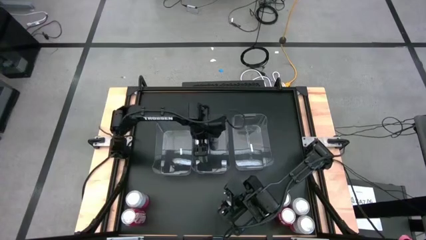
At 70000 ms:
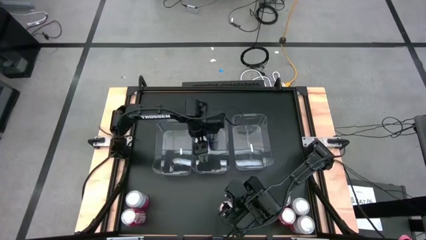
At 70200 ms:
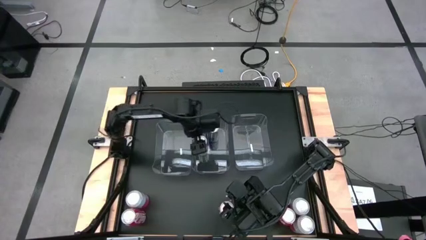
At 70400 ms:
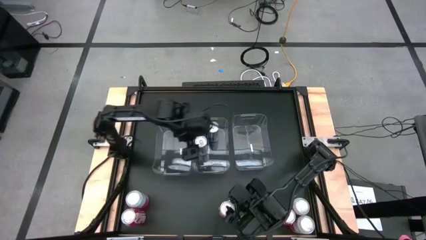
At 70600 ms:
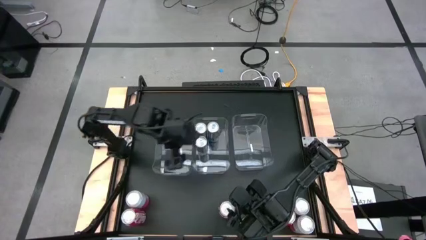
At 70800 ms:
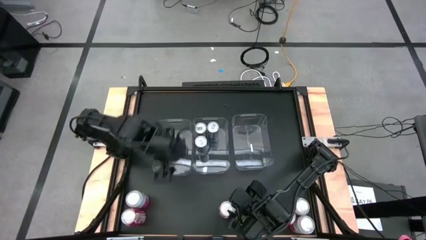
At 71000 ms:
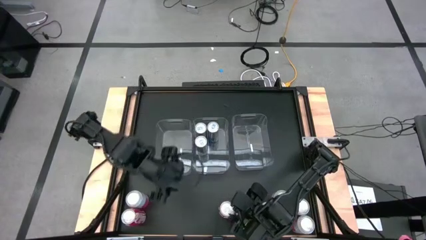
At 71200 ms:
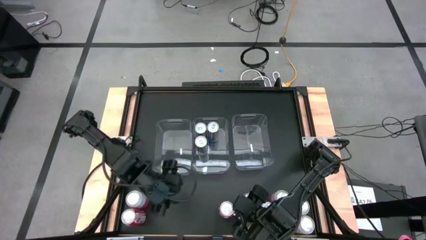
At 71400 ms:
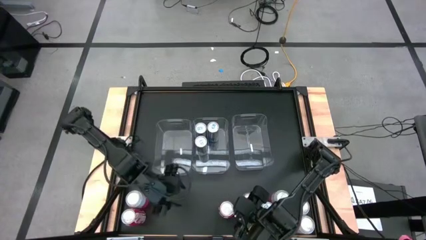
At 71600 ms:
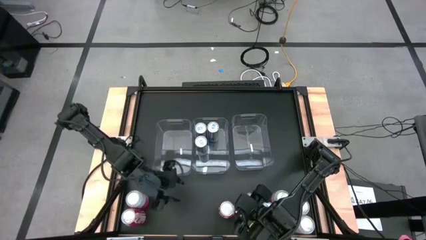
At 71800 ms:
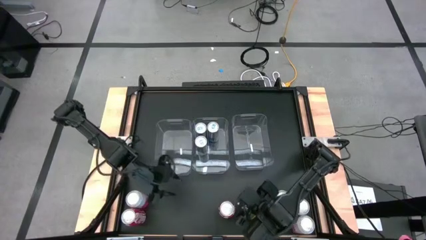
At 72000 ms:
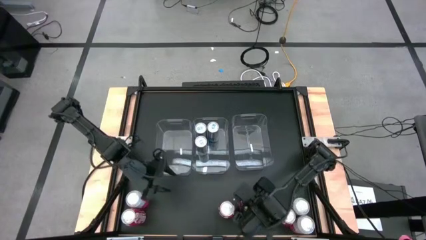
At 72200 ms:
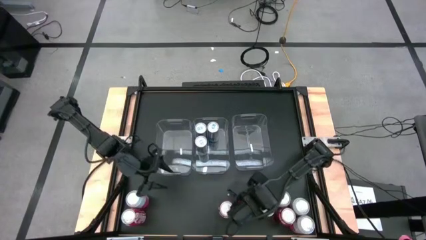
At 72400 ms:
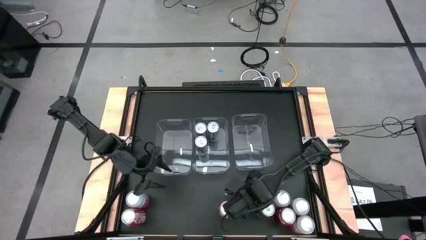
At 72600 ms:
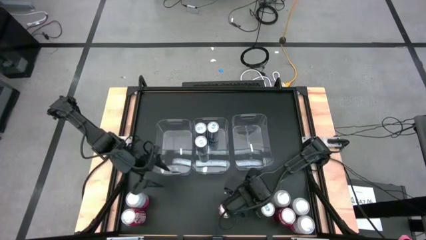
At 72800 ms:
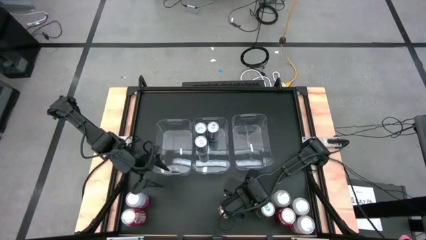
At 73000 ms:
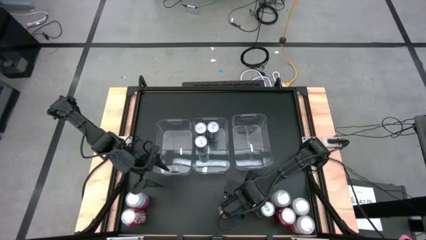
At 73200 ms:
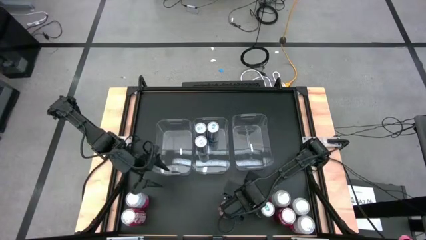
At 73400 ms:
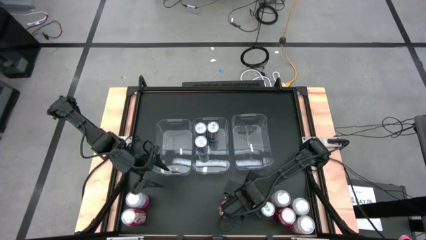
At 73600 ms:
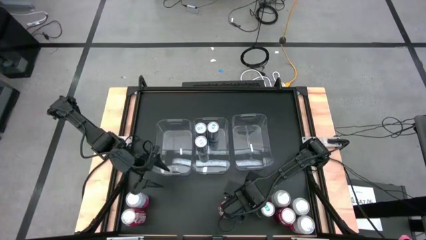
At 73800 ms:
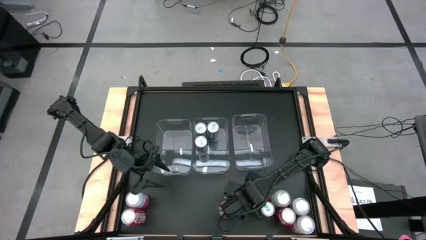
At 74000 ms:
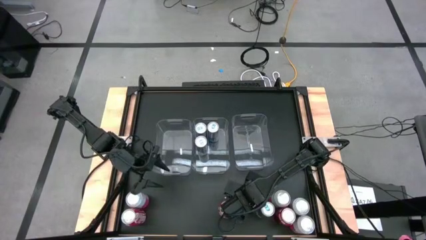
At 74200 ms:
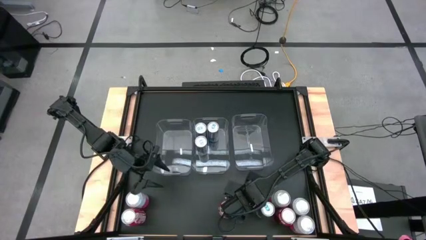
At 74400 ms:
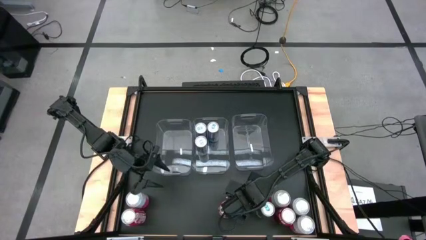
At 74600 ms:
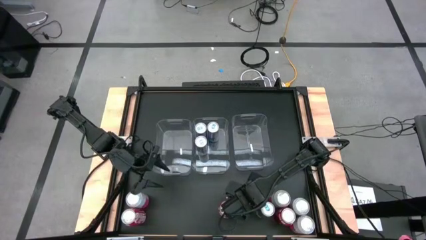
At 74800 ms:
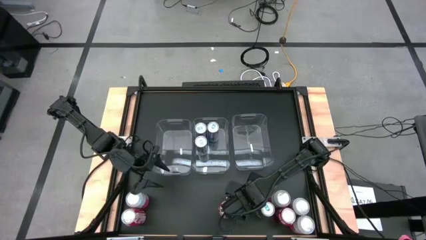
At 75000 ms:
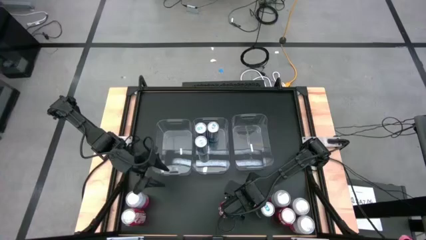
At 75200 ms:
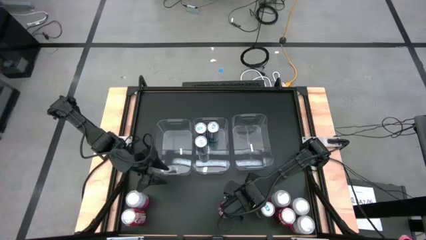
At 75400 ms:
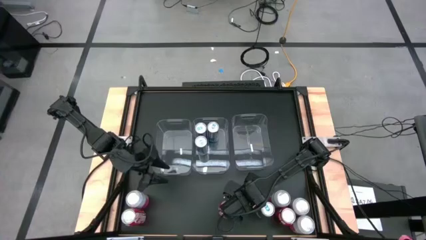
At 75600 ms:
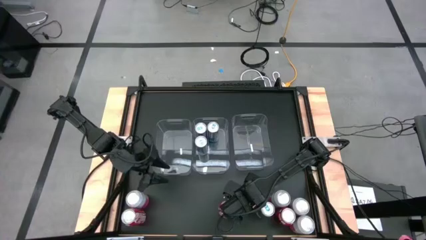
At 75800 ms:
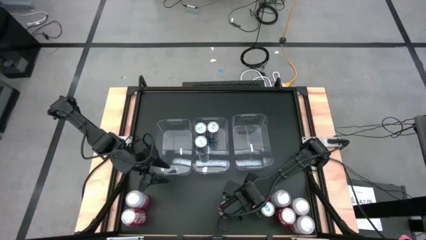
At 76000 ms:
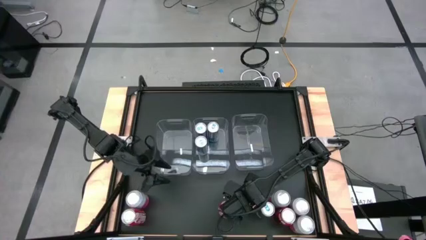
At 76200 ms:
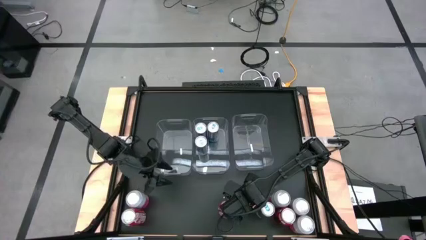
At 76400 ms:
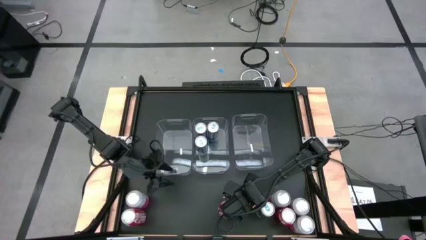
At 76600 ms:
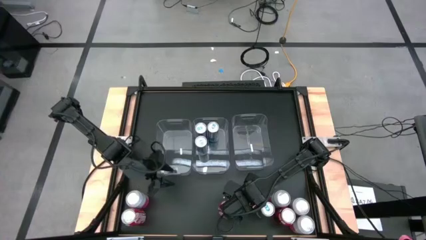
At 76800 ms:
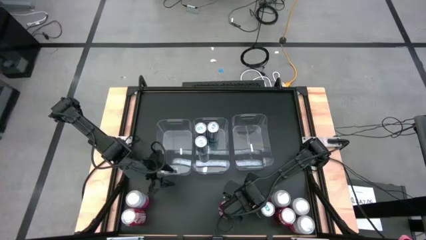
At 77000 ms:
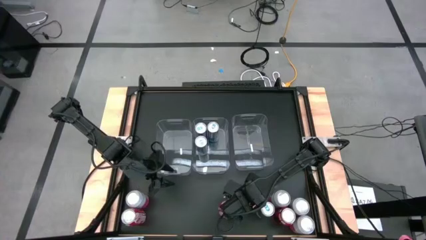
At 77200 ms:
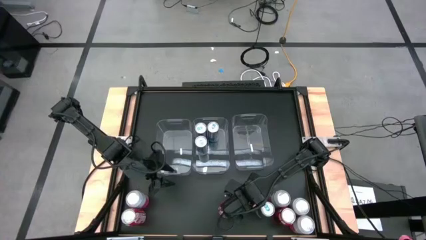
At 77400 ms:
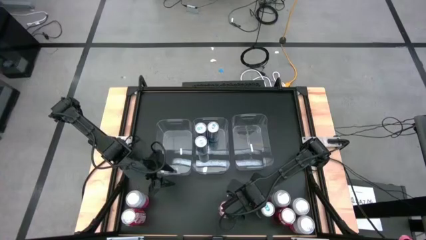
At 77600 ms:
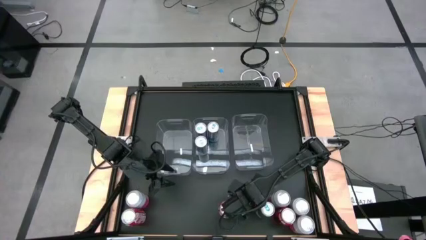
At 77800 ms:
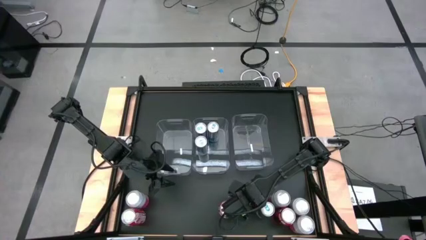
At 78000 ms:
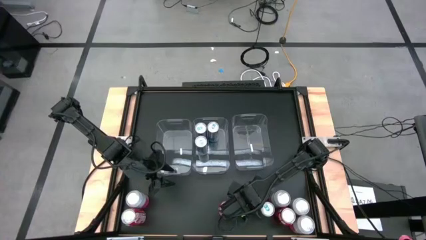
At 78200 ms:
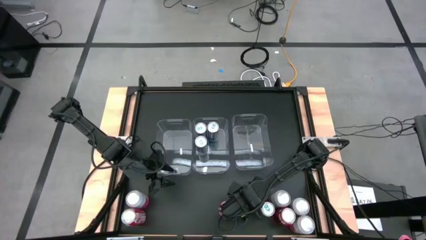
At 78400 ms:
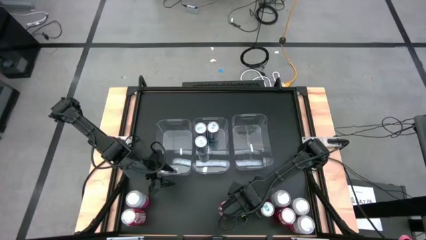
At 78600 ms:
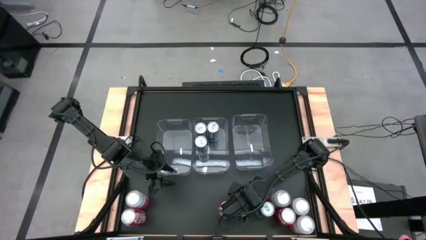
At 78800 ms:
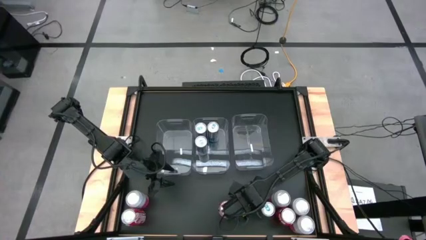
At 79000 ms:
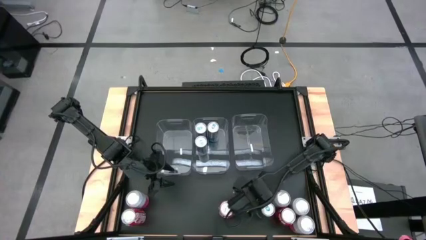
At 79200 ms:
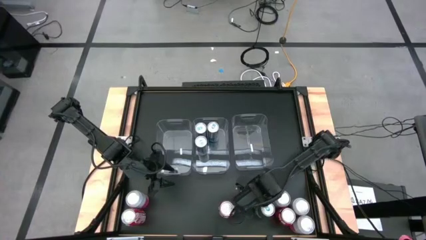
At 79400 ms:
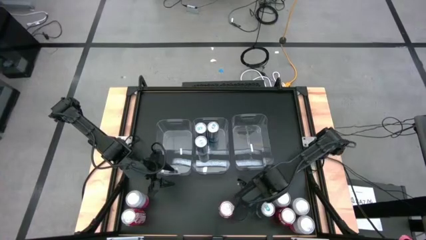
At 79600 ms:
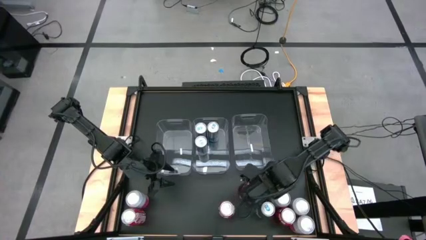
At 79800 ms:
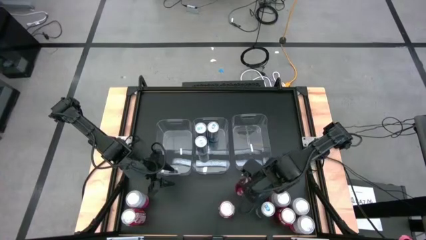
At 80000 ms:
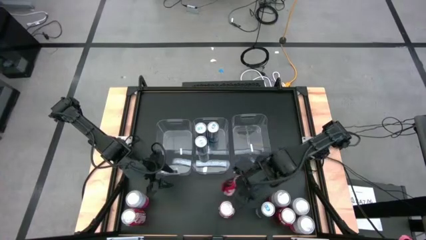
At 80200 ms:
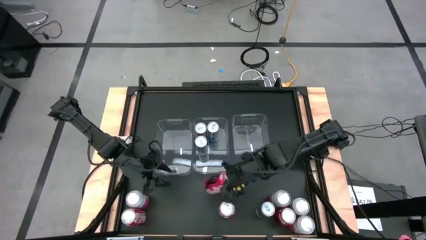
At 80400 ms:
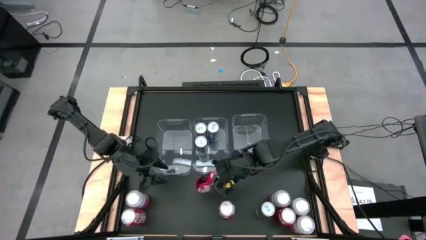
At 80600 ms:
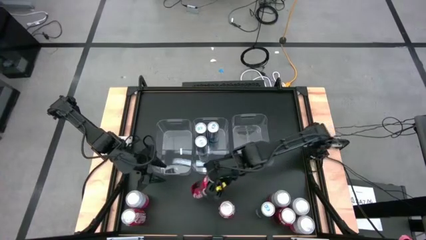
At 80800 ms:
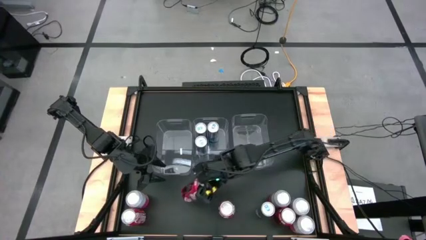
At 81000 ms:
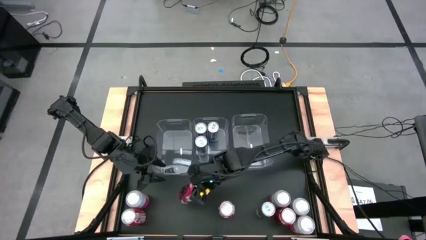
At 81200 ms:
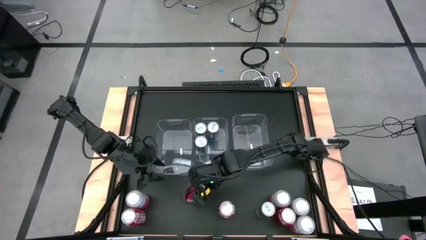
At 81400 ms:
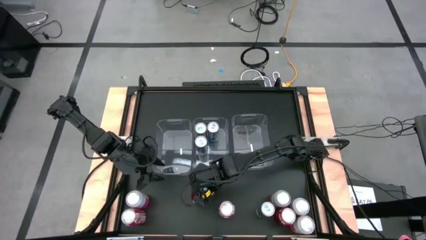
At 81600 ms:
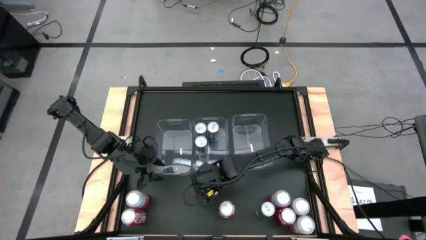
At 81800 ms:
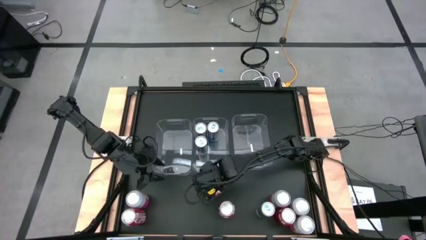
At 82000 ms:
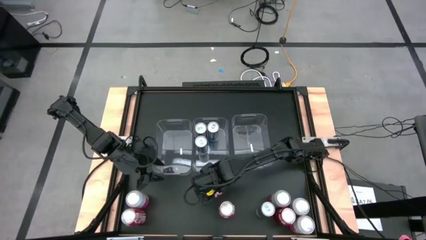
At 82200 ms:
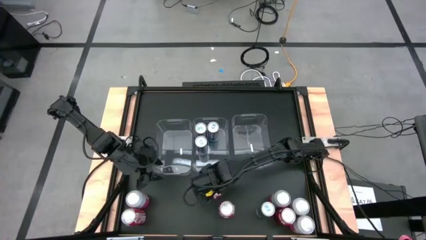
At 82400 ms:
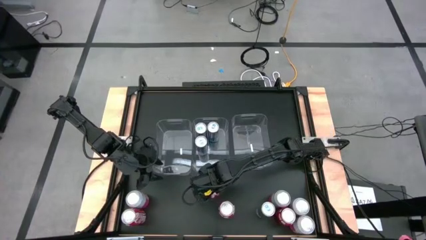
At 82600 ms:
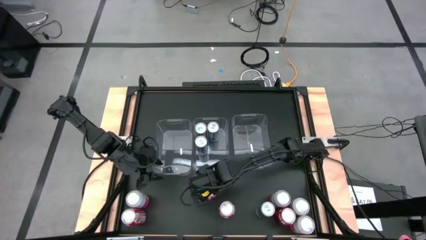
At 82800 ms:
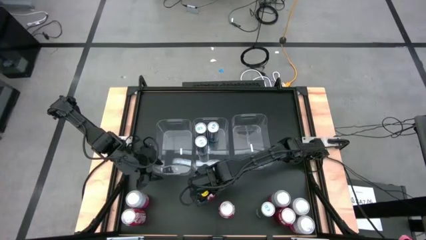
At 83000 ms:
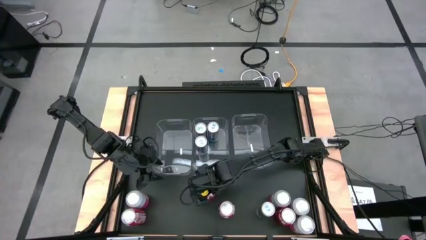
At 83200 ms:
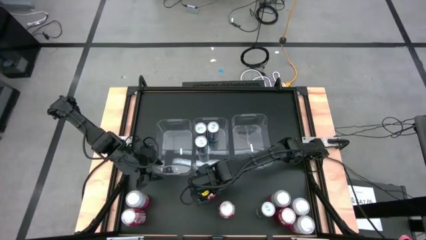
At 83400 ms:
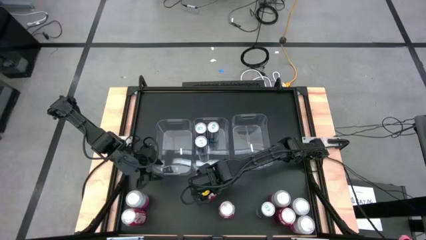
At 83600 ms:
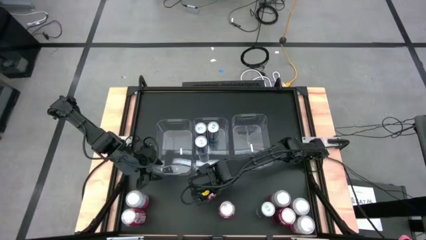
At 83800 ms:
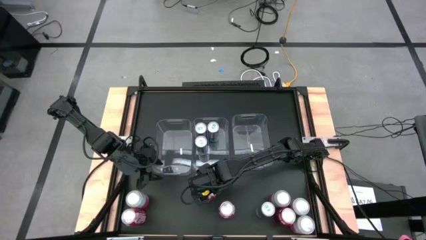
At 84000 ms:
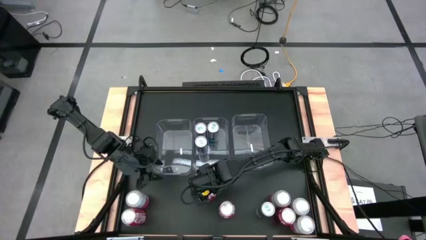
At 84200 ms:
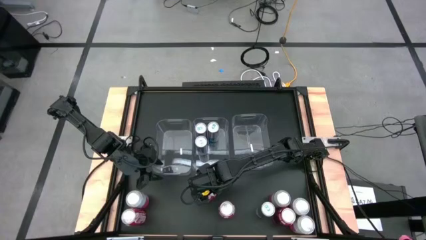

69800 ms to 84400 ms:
Task: Sort soda cans
Put the red soda can into the left transparent bin

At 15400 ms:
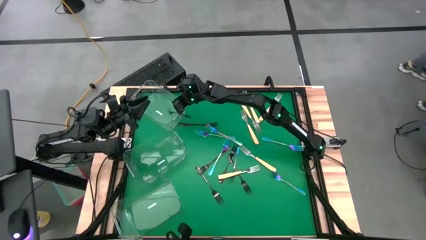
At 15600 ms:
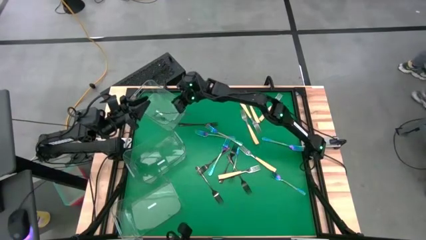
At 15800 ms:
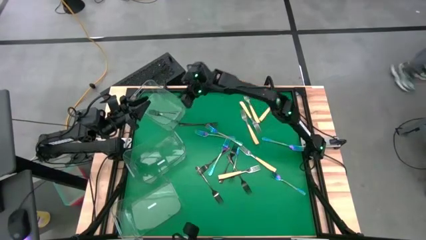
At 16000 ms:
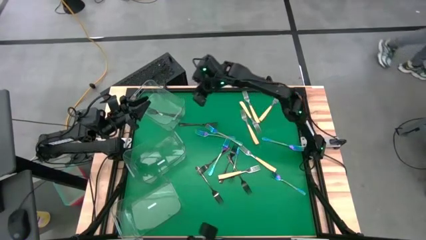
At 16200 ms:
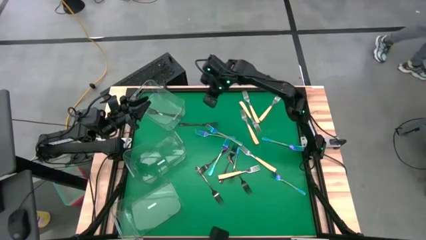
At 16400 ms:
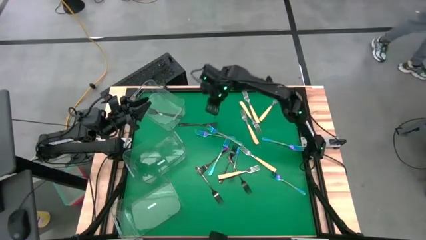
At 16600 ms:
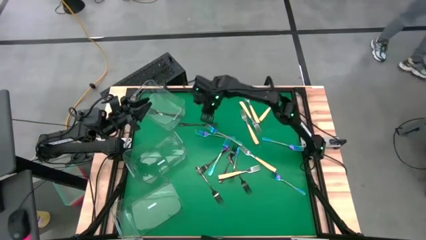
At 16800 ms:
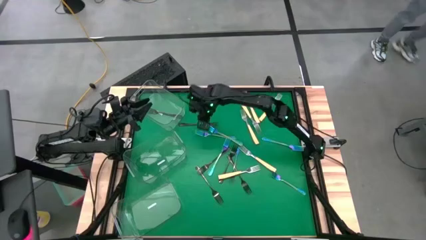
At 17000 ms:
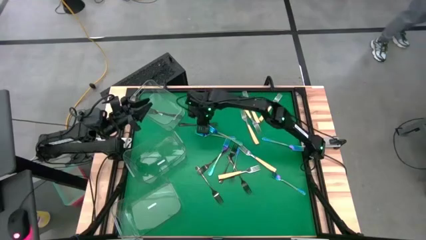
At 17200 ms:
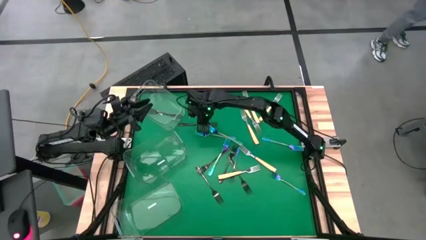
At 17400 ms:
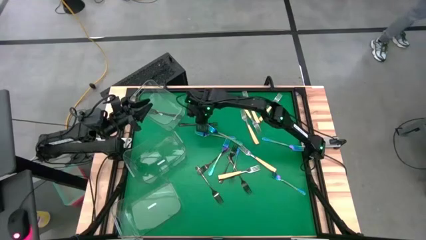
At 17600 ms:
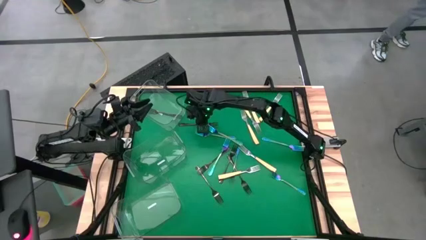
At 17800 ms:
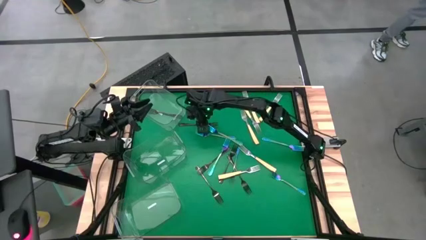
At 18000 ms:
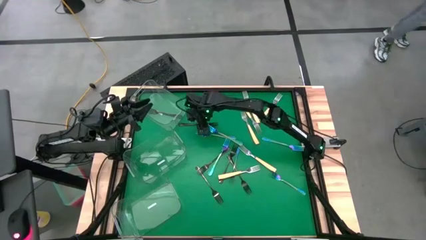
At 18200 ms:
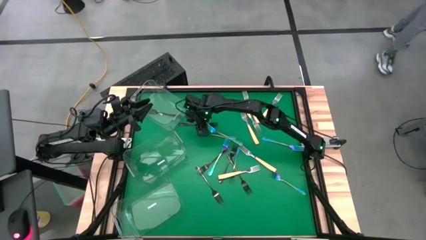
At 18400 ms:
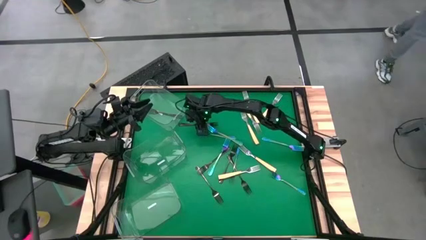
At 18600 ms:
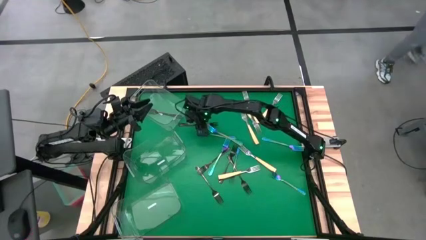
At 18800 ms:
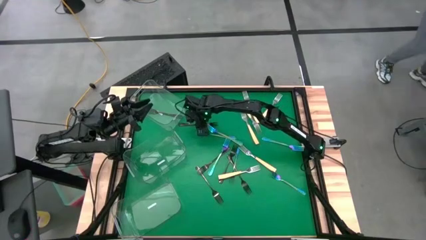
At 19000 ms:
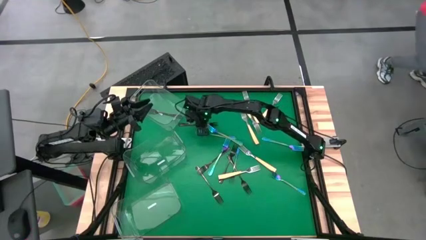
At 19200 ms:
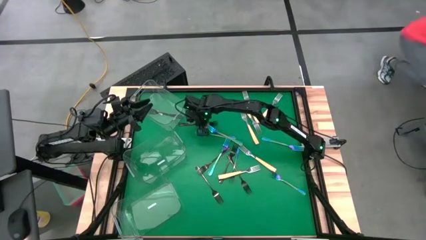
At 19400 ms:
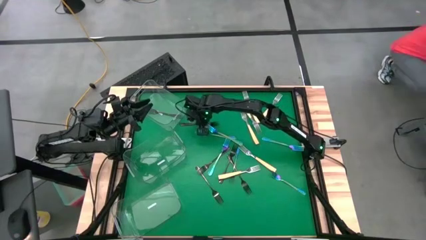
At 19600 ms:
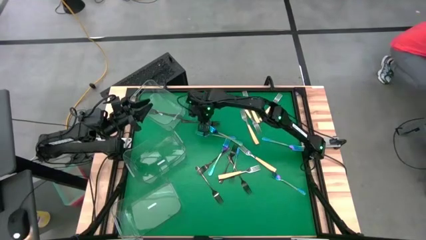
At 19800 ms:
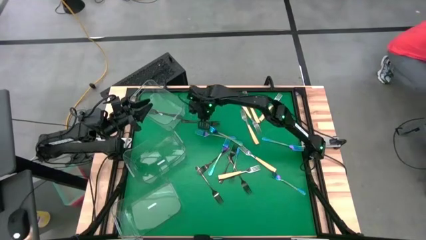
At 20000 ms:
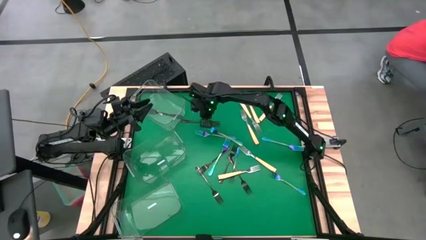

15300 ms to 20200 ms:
Task: Sort silverware by color (type)
Put the black fork into the top transparent bin
